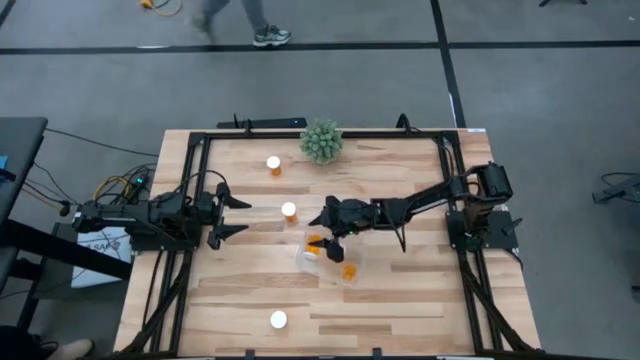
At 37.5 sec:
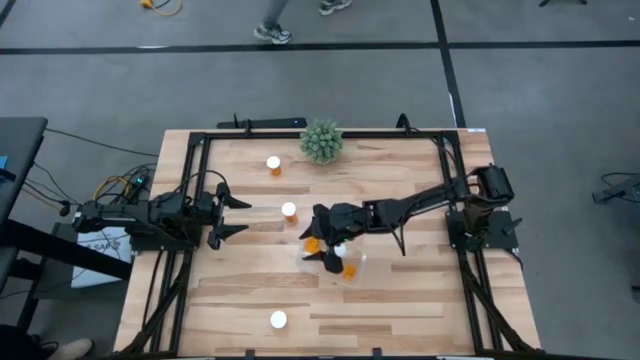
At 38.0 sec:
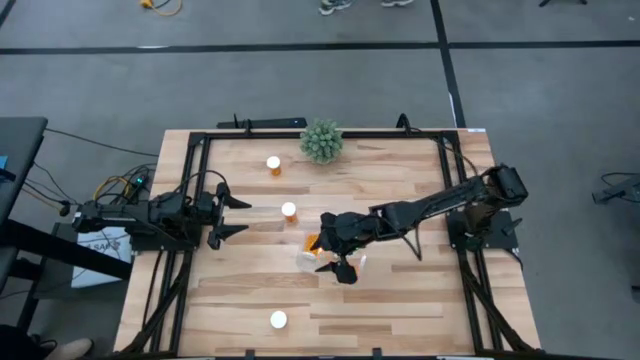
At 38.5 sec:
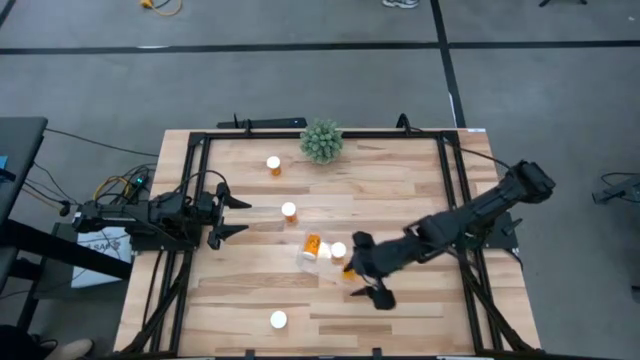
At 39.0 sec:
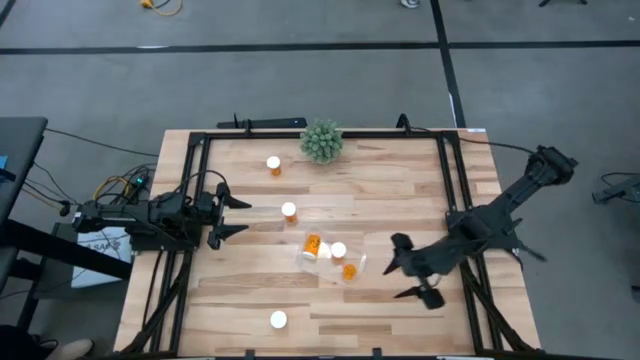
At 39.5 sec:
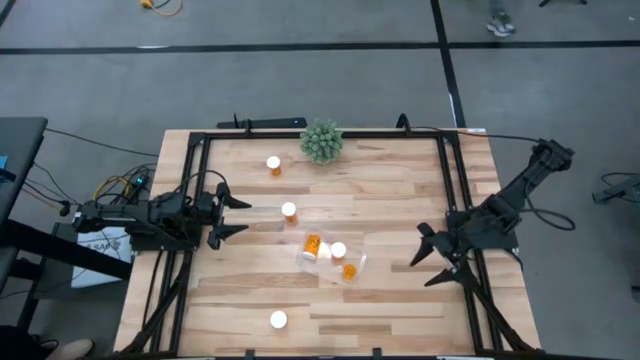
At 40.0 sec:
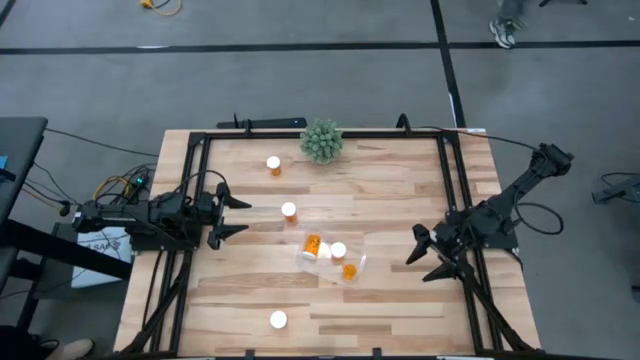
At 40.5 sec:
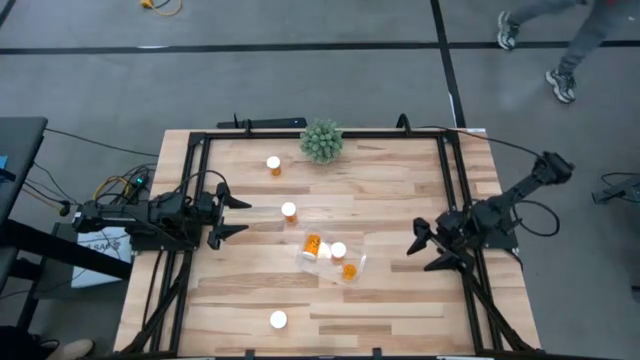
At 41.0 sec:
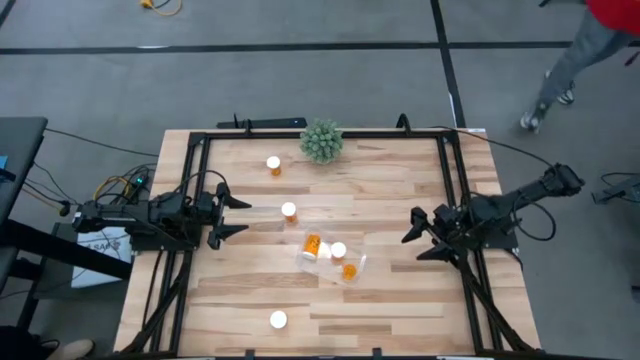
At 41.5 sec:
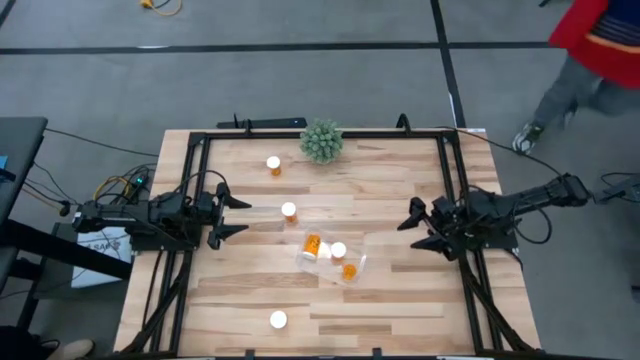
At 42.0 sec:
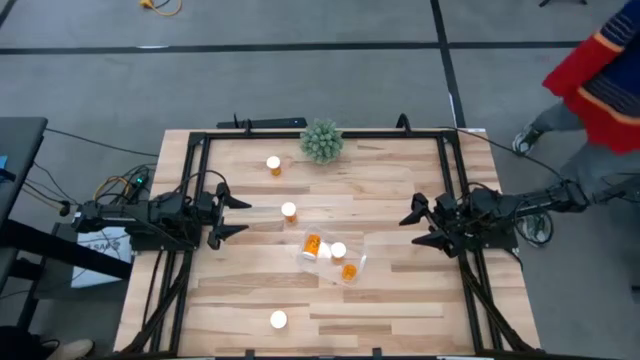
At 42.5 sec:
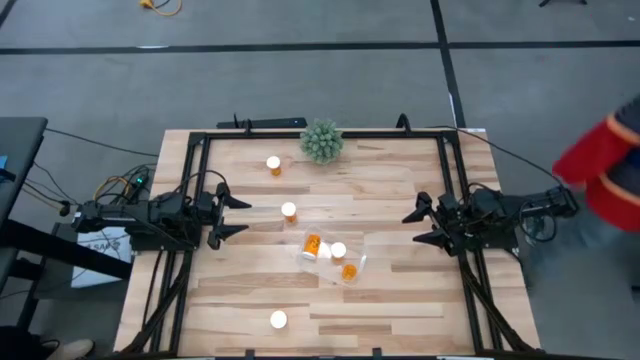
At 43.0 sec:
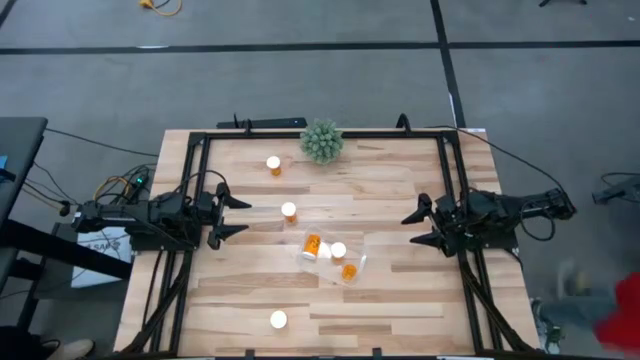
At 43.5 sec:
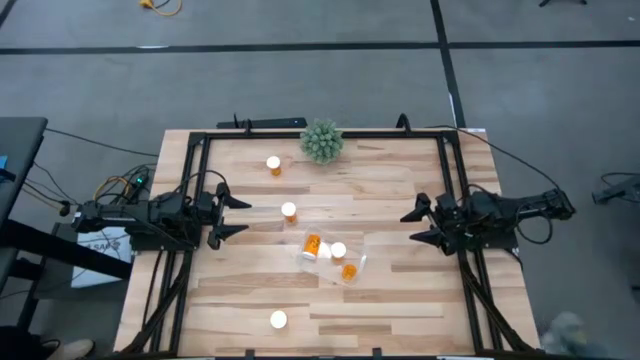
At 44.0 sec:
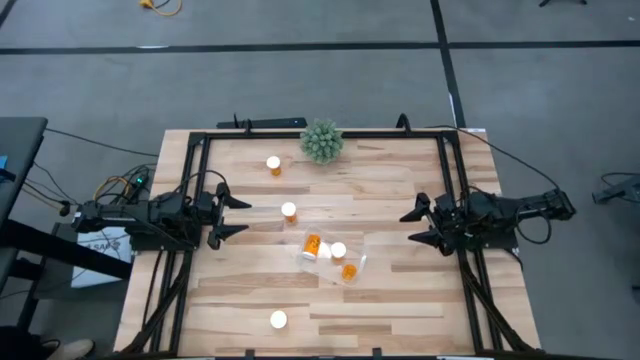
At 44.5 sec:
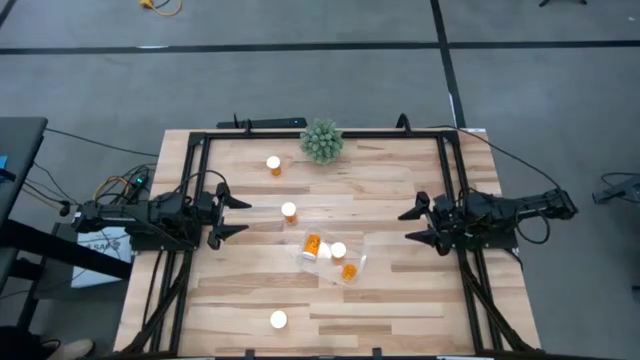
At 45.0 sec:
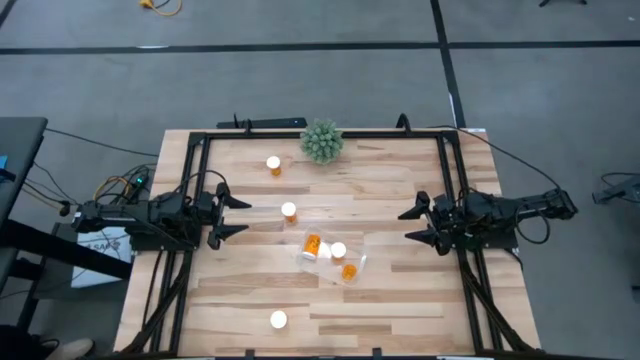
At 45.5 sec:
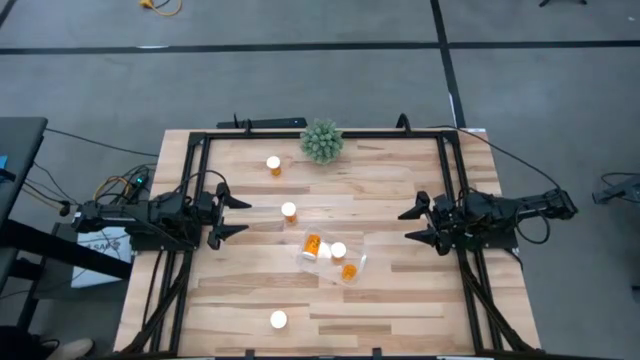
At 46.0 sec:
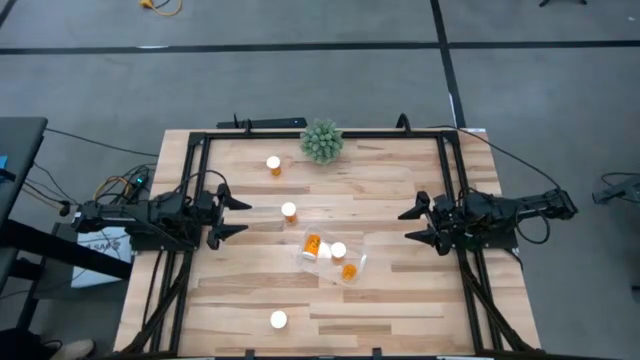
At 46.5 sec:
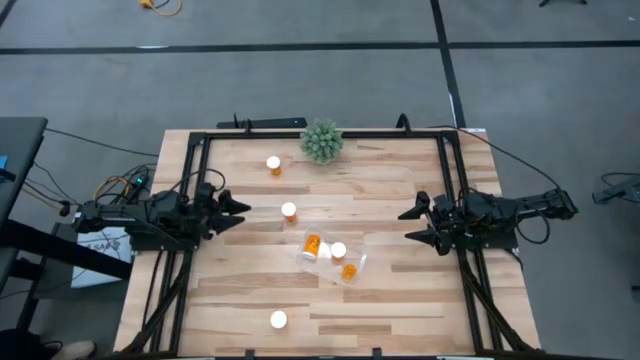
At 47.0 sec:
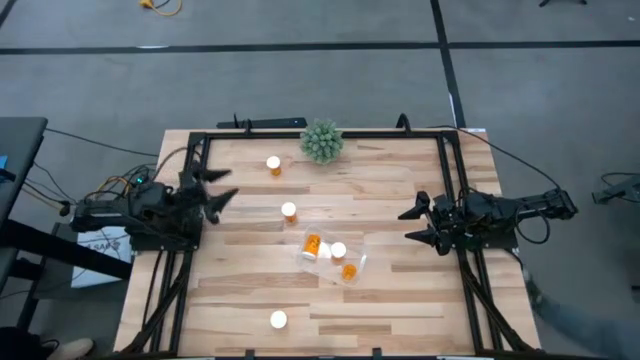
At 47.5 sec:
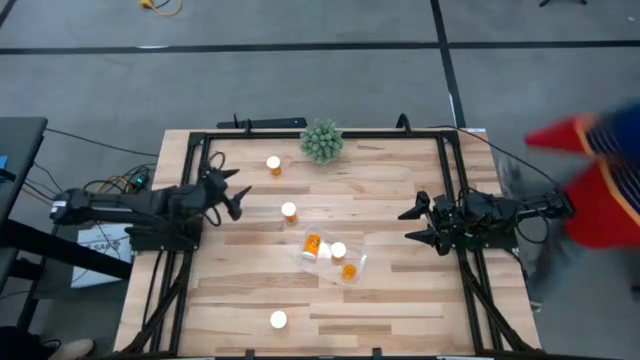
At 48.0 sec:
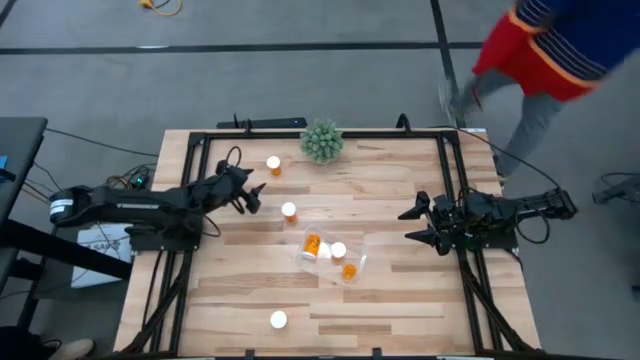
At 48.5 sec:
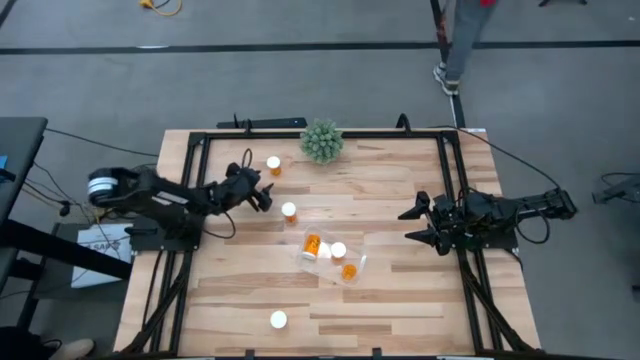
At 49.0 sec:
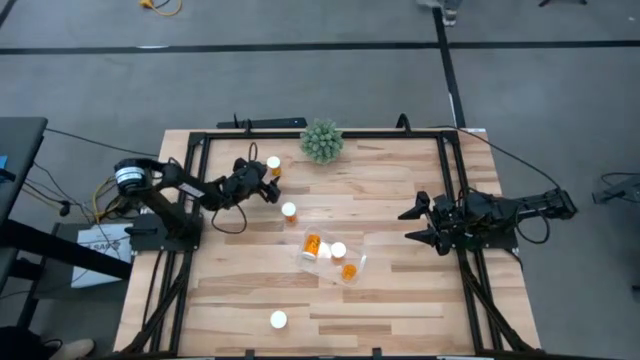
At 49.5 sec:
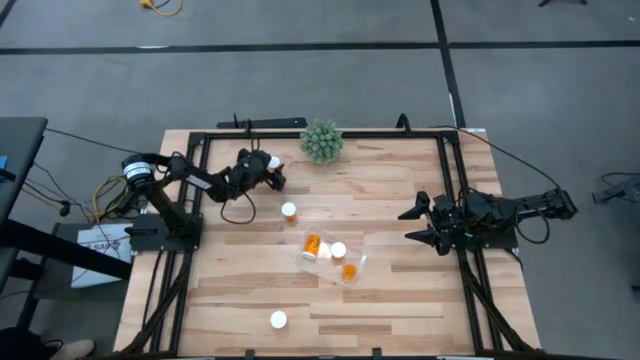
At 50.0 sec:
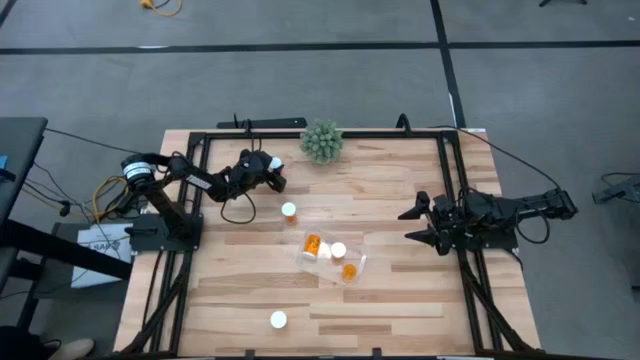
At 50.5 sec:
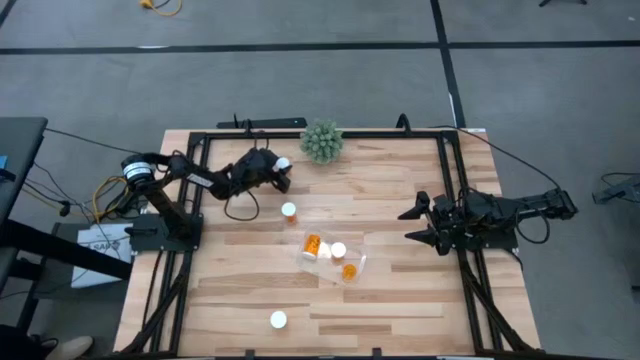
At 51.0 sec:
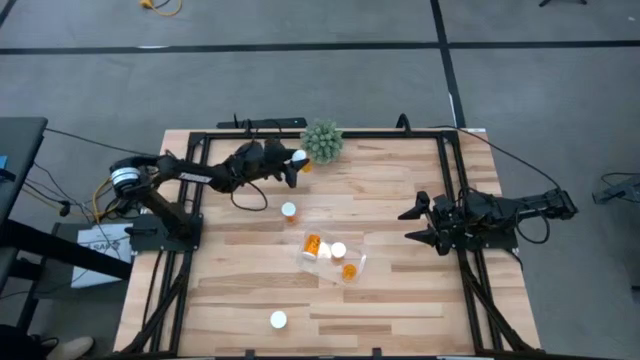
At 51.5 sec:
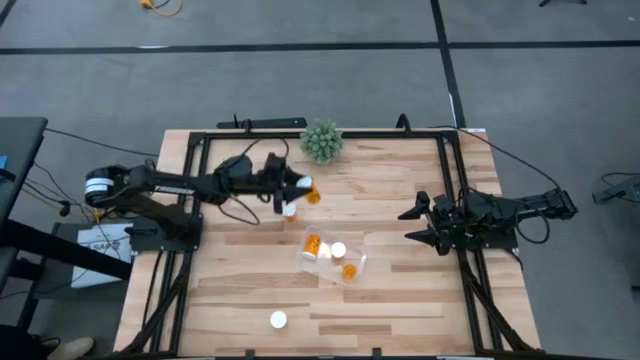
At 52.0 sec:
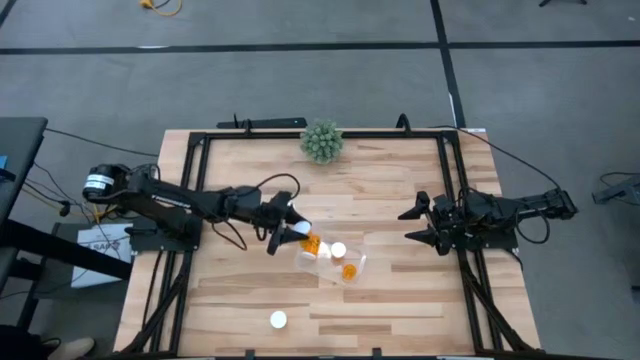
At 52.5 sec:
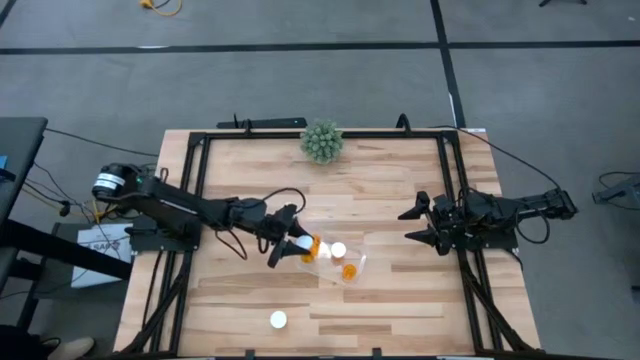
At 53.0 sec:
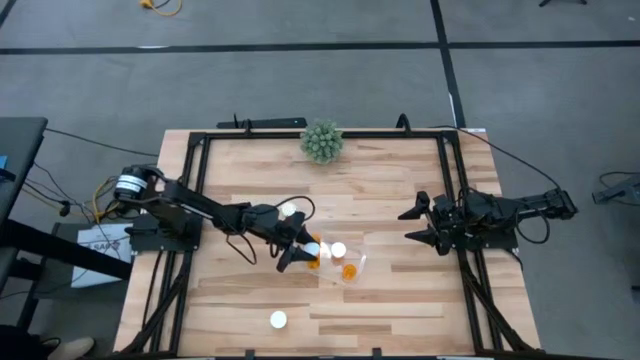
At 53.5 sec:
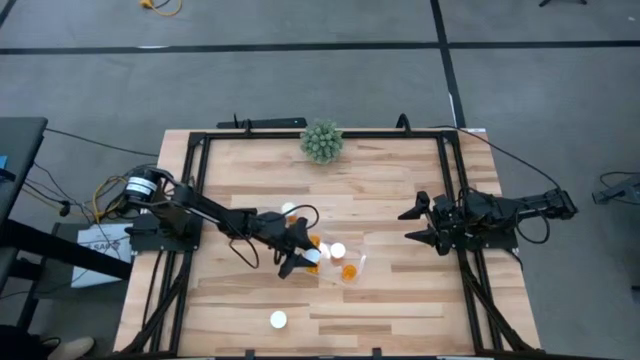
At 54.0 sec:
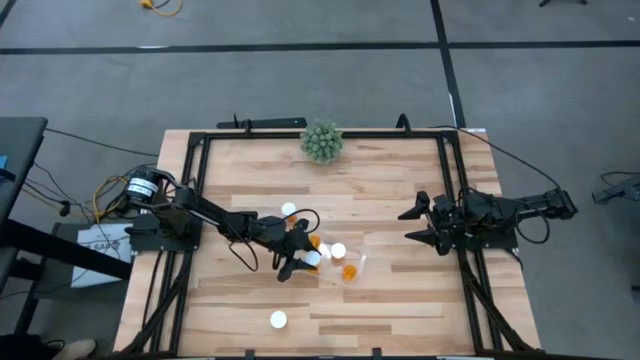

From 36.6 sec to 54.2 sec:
Task: Pick and place pill bottles into a basket
Put the orange pill bottle into the transparent bin
